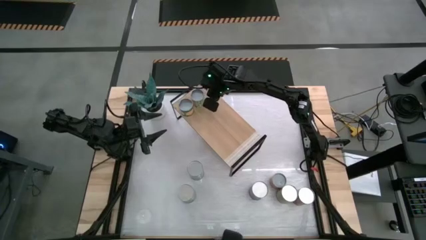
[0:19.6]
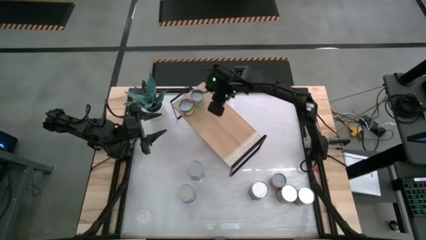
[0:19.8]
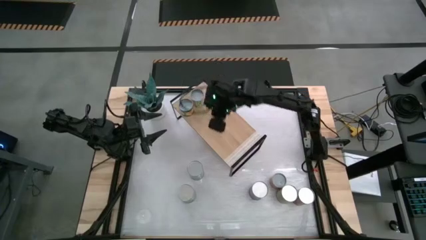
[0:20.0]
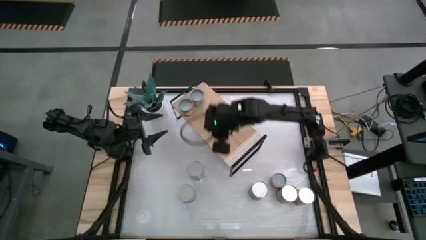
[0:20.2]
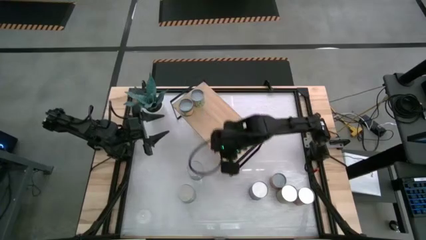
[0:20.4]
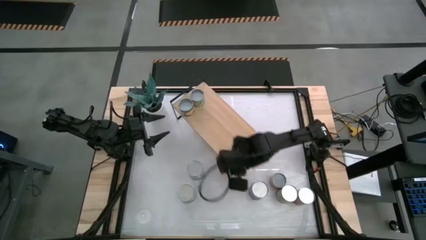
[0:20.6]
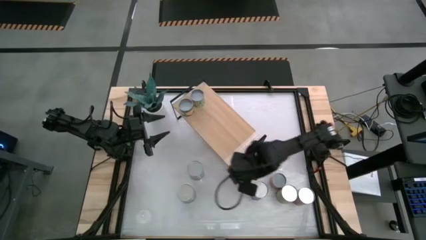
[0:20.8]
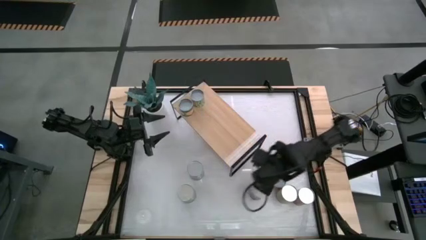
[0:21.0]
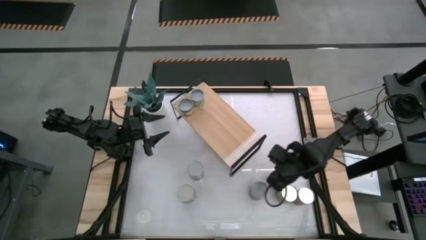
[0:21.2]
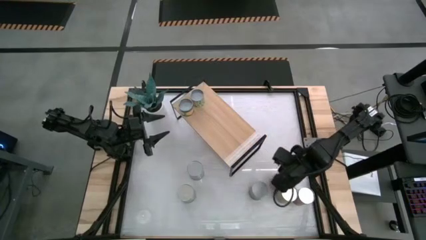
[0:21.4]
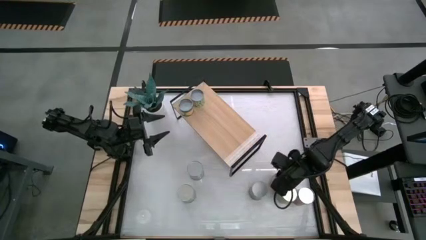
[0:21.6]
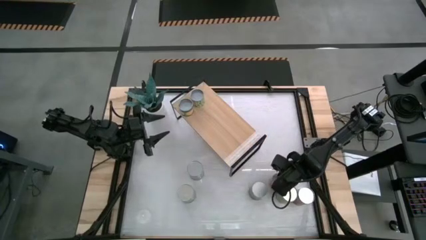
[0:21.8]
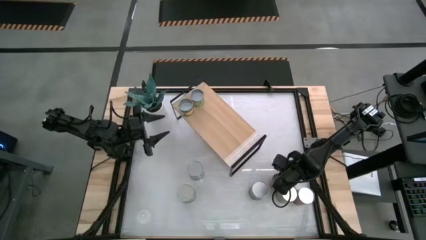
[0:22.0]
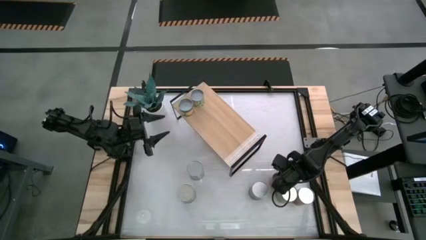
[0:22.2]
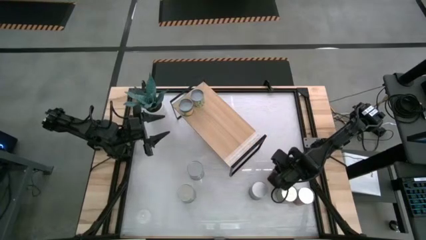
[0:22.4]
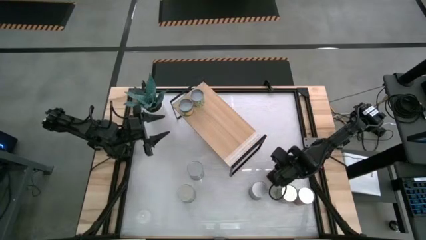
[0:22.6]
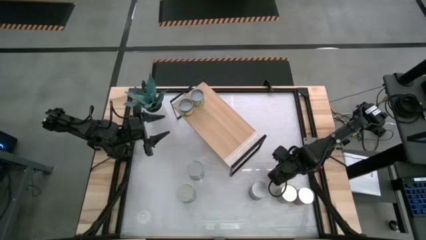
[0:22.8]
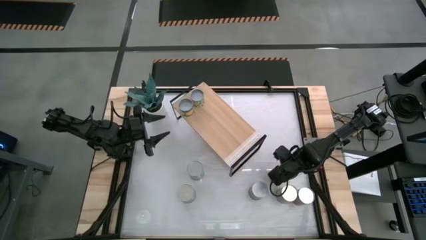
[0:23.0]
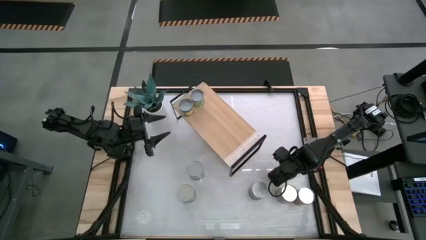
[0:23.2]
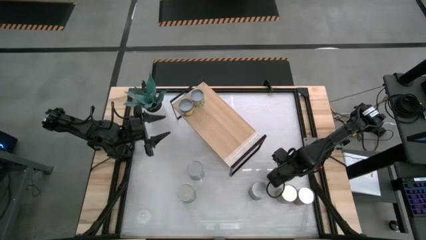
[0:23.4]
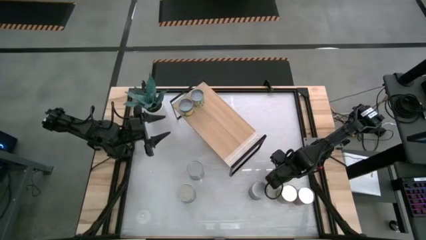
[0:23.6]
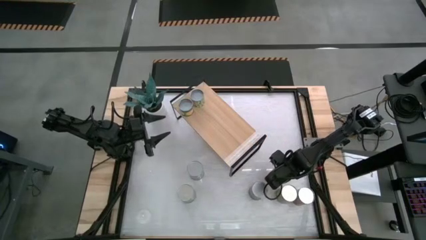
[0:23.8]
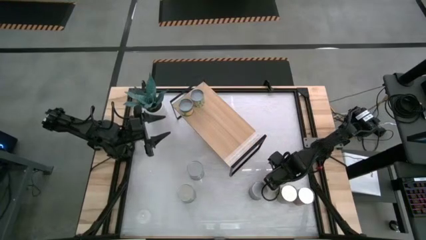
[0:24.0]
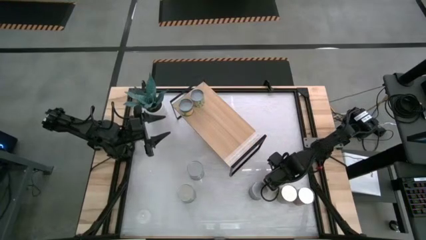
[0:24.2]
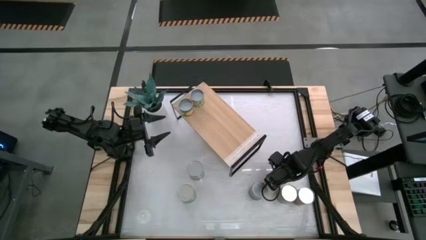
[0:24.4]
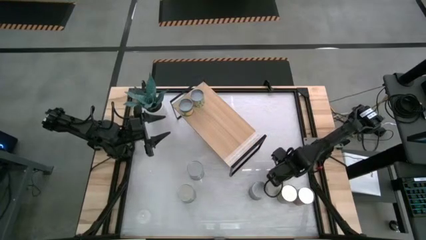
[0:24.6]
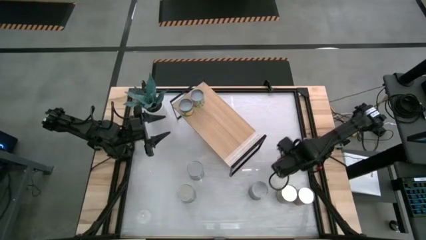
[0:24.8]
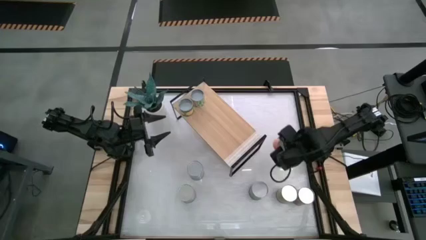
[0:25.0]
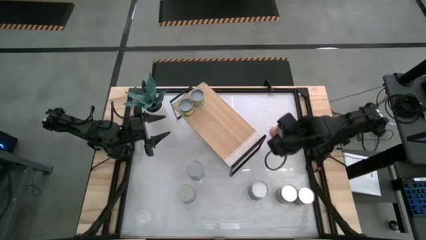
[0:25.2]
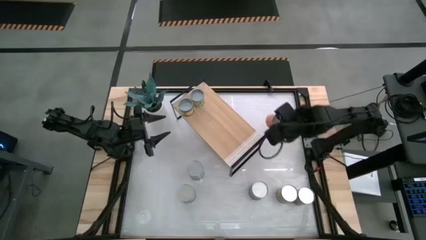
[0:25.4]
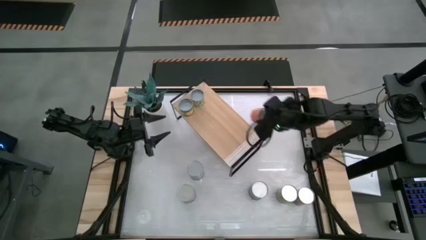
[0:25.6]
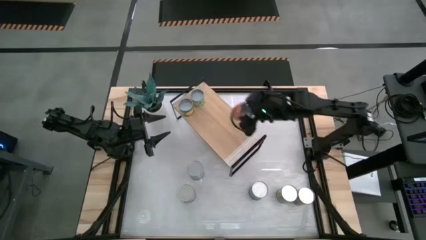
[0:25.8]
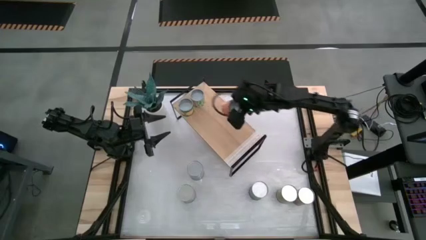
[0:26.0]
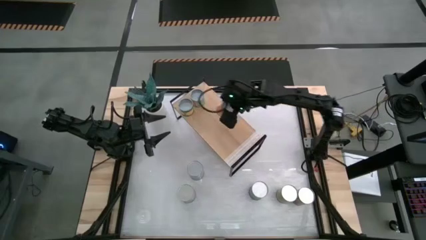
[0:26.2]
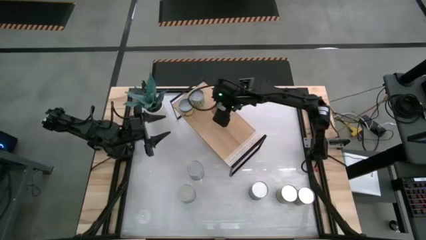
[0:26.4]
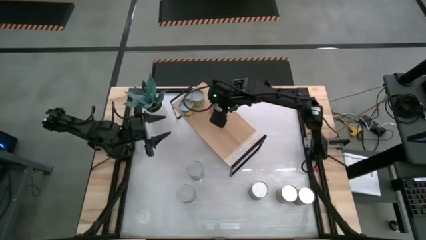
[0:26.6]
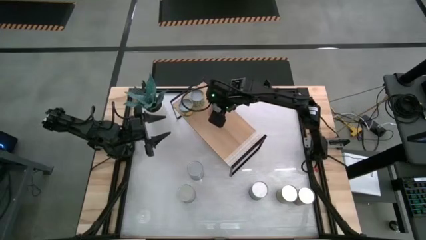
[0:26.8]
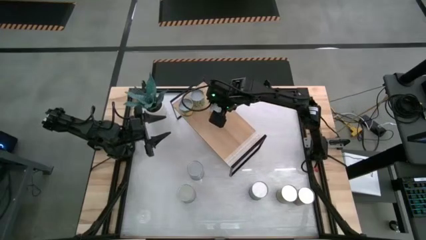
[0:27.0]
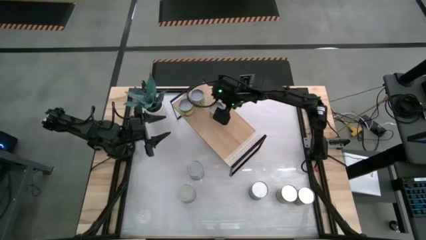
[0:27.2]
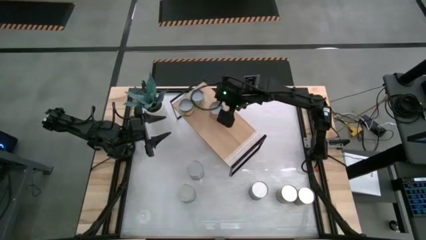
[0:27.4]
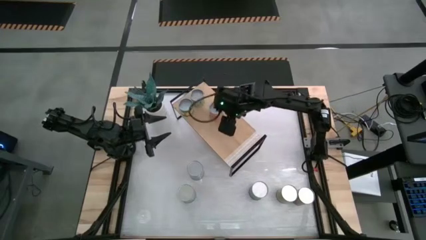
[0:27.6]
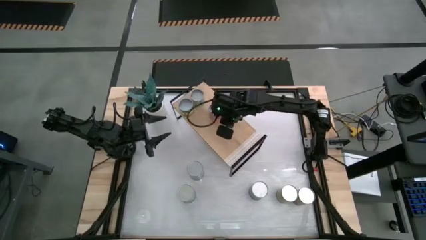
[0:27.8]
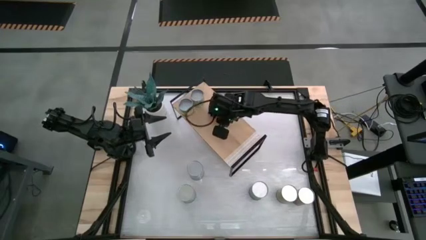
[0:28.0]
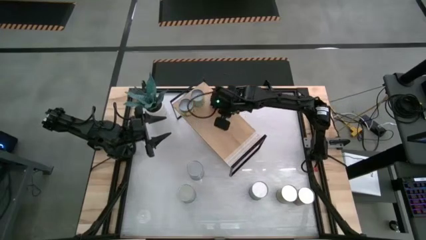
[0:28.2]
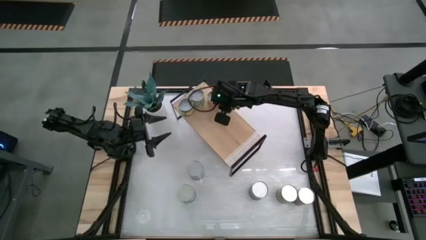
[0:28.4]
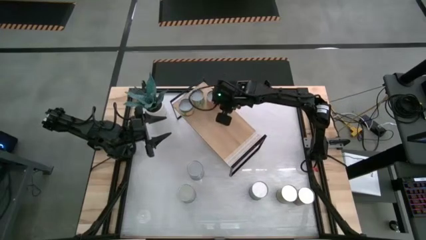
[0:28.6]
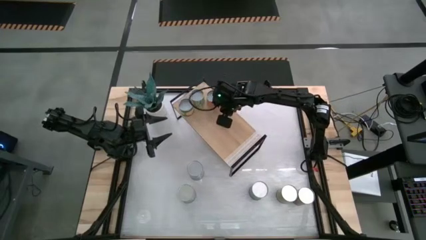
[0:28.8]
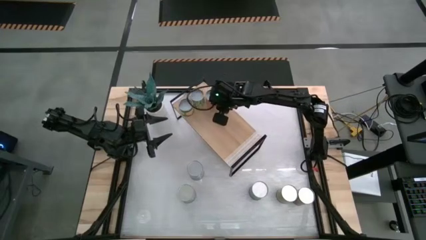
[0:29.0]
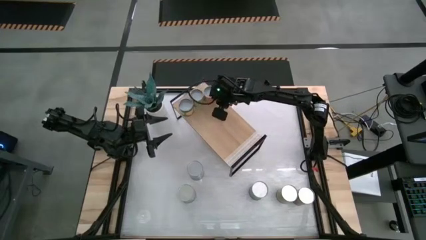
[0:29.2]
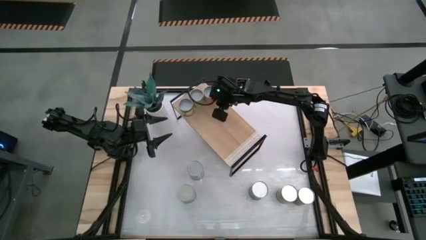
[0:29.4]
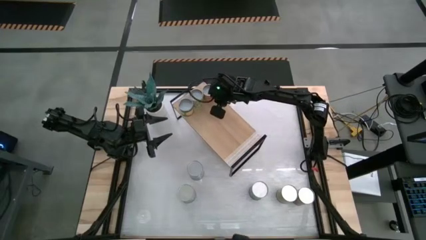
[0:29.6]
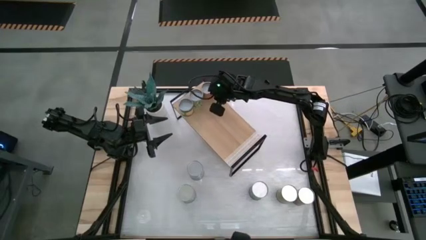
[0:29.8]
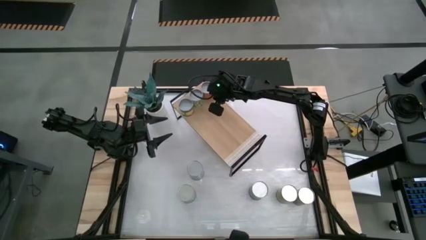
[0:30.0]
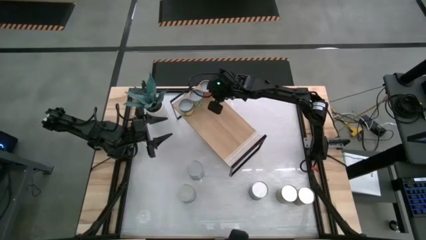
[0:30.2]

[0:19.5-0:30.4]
Task: Pick and place cans onto a shelf
Put the canned orange on the shelf

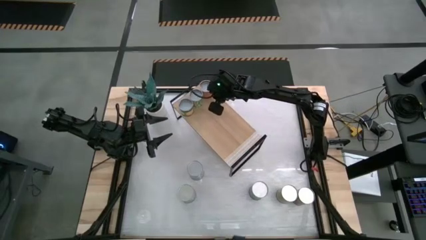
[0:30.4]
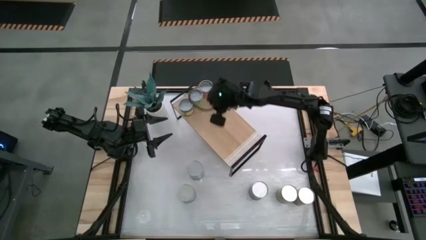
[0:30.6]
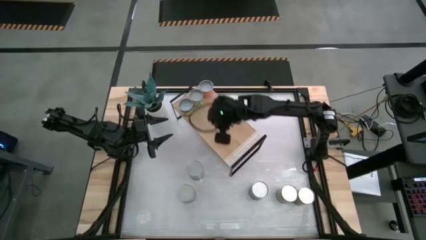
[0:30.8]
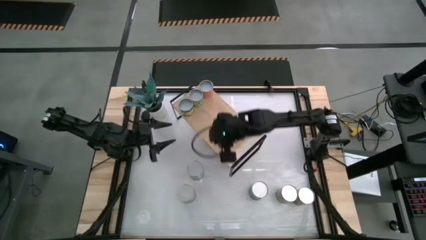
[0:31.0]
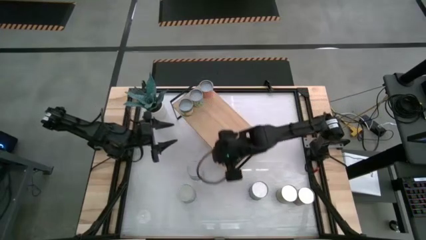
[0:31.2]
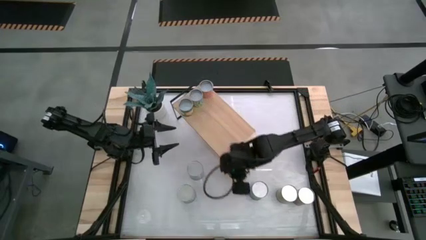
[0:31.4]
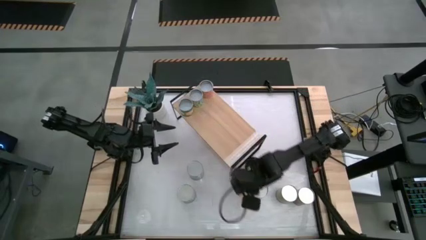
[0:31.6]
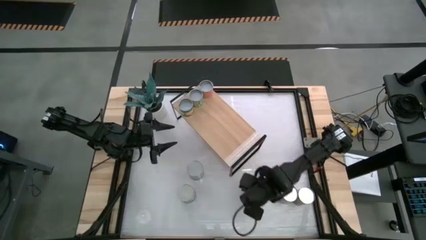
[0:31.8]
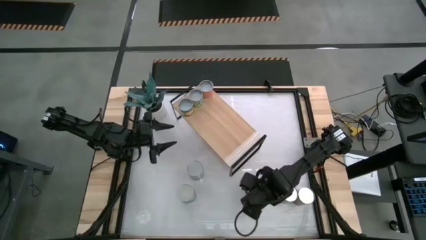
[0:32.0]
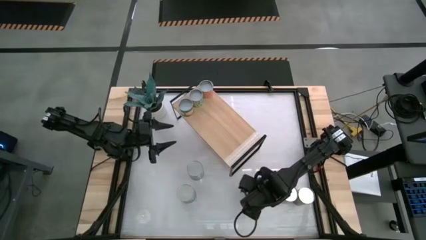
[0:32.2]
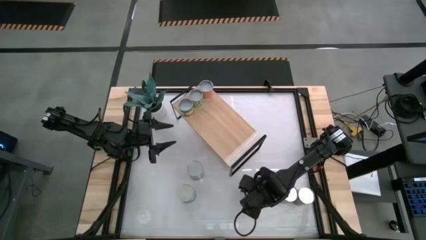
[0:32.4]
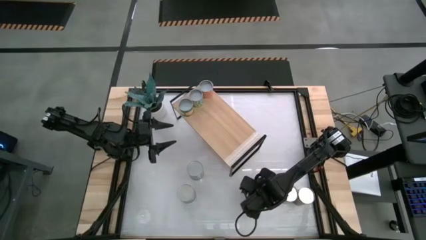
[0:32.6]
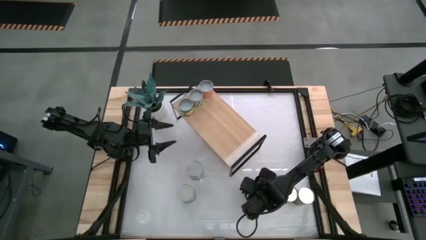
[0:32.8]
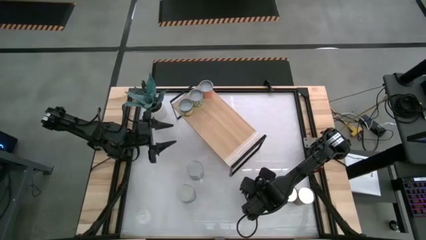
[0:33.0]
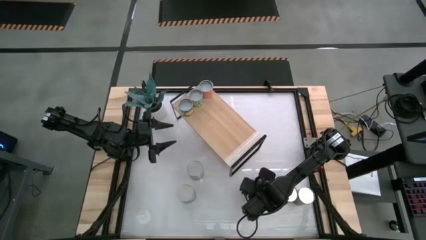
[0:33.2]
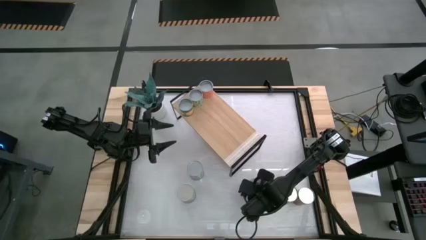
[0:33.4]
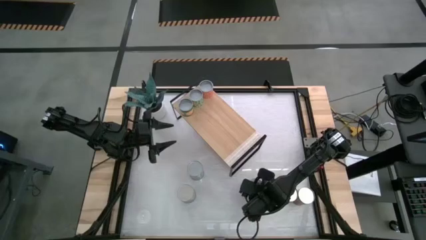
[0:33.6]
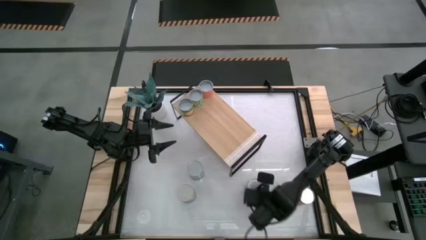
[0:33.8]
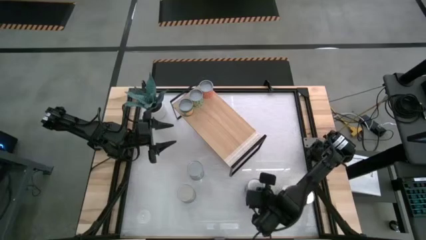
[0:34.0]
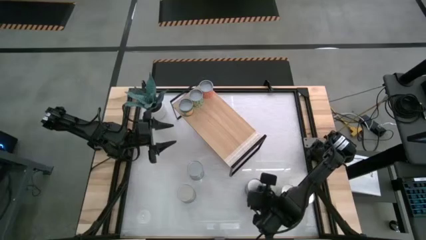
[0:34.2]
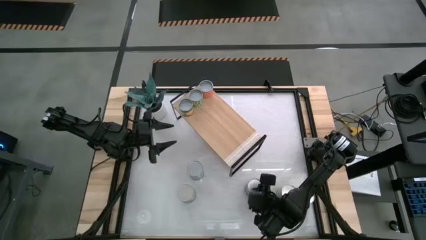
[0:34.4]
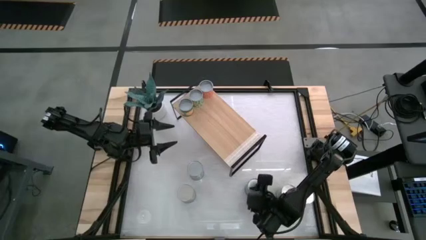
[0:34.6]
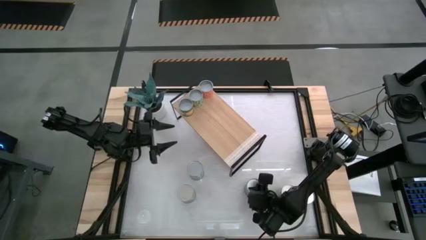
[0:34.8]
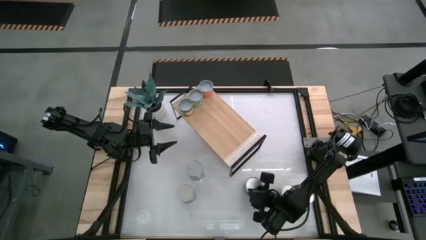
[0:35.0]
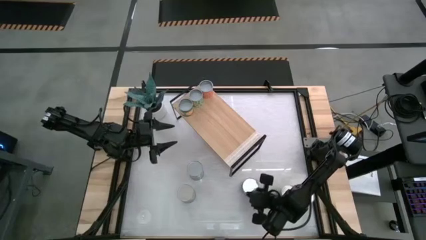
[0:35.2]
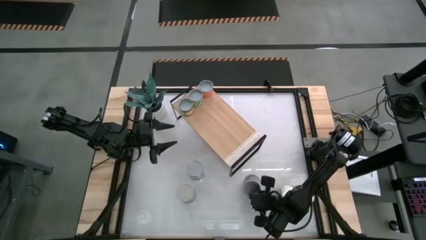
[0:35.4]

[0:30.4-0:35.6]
Put the canned peas on the shelf
